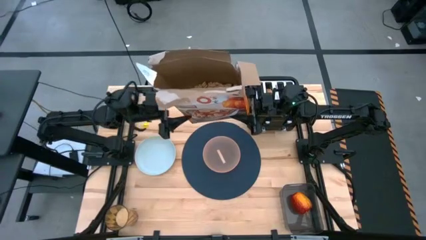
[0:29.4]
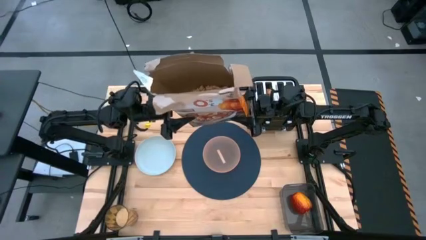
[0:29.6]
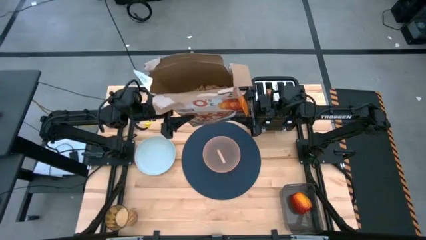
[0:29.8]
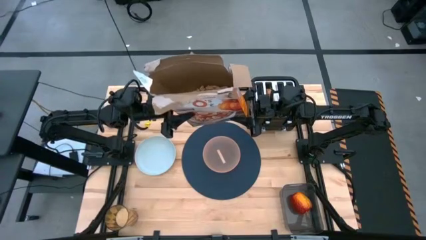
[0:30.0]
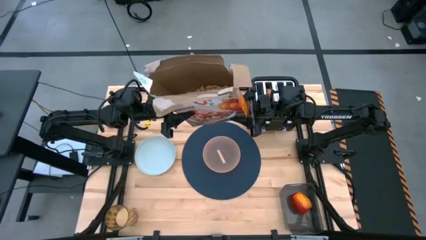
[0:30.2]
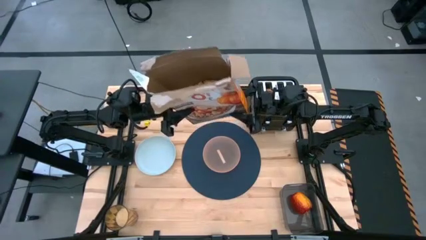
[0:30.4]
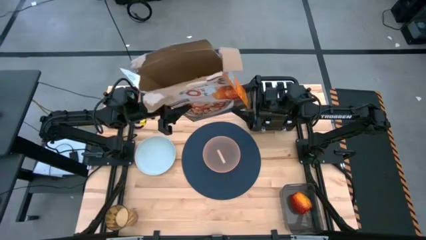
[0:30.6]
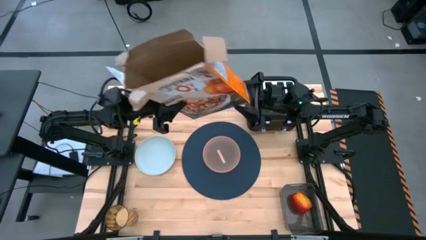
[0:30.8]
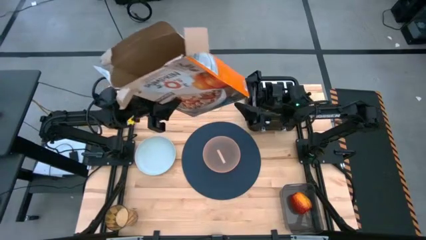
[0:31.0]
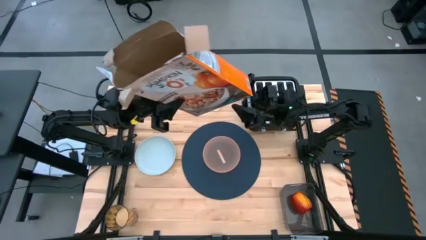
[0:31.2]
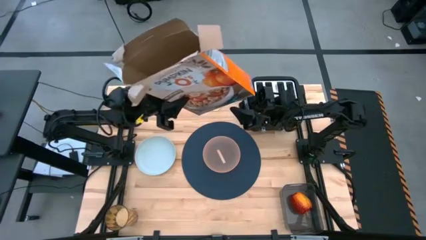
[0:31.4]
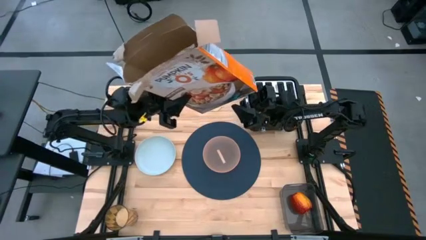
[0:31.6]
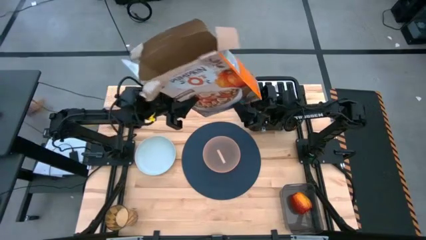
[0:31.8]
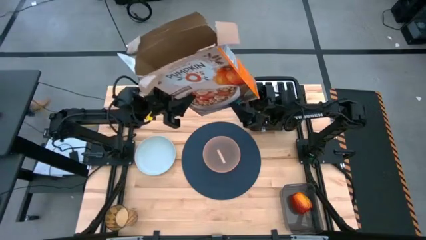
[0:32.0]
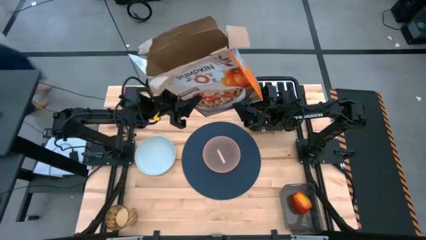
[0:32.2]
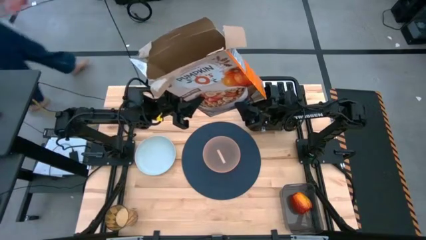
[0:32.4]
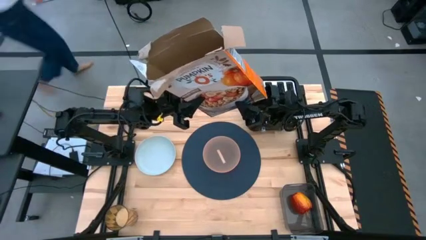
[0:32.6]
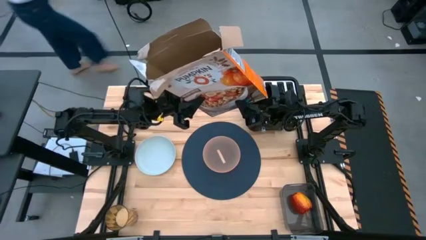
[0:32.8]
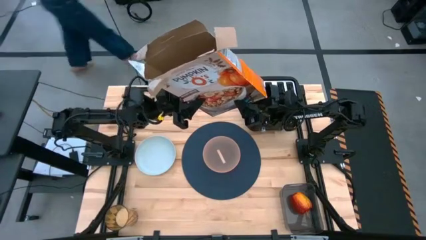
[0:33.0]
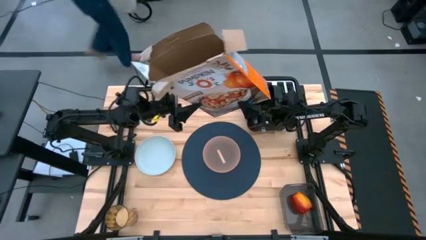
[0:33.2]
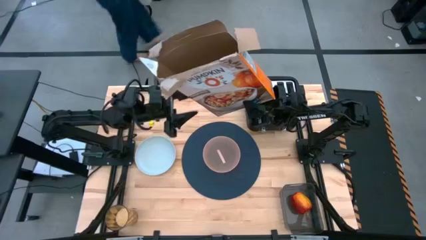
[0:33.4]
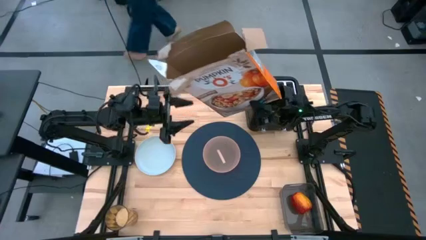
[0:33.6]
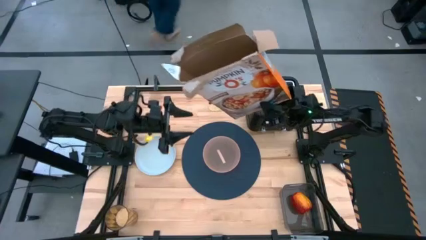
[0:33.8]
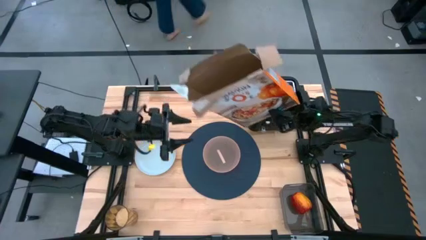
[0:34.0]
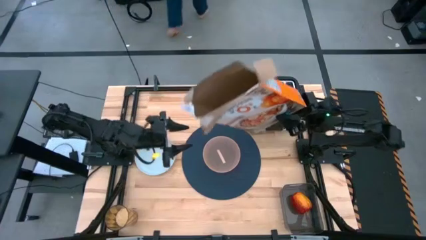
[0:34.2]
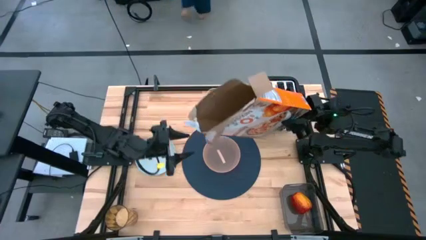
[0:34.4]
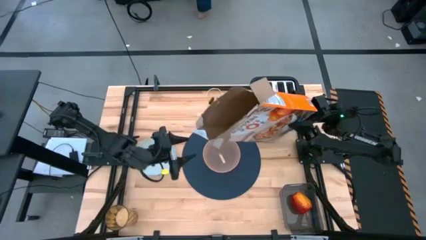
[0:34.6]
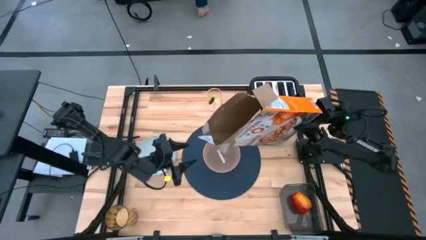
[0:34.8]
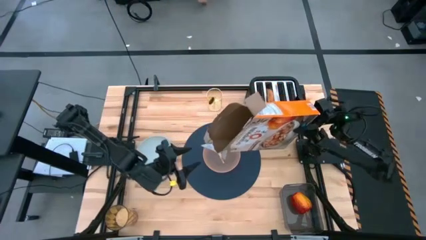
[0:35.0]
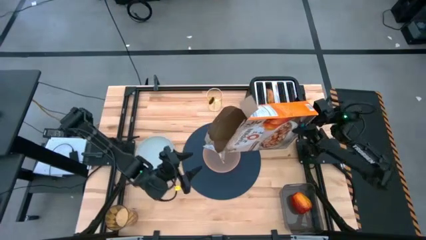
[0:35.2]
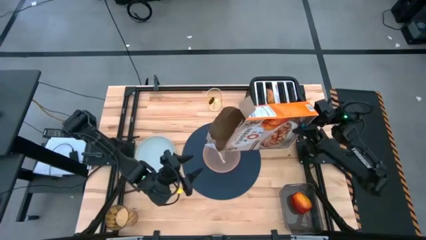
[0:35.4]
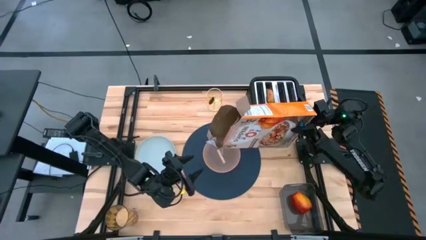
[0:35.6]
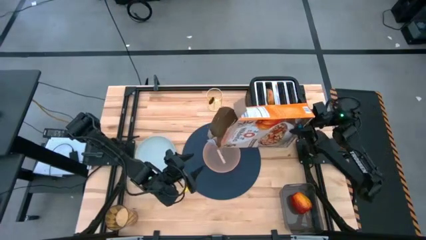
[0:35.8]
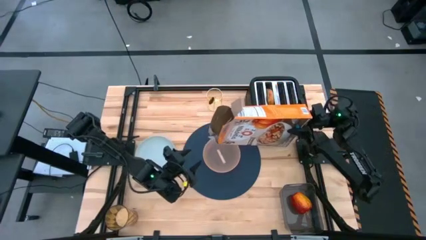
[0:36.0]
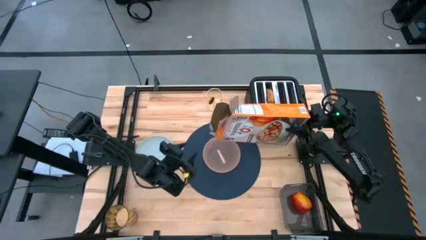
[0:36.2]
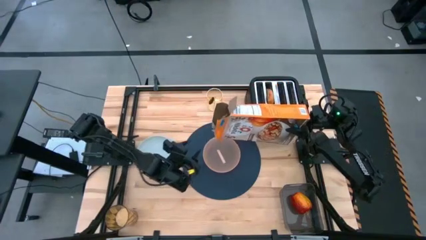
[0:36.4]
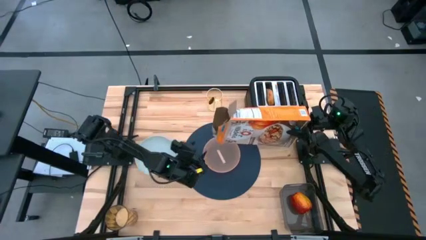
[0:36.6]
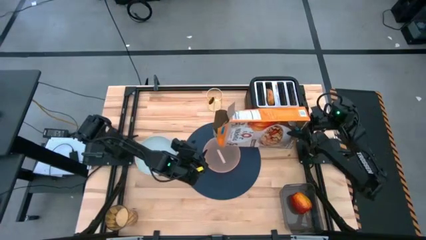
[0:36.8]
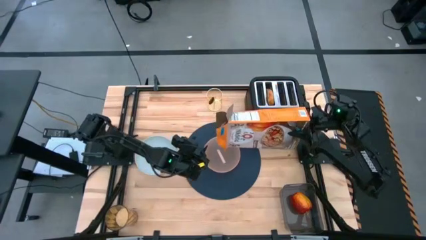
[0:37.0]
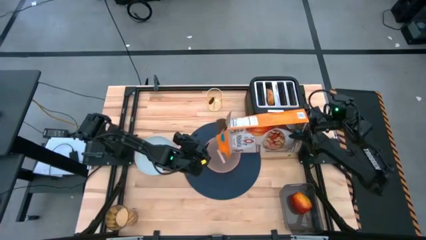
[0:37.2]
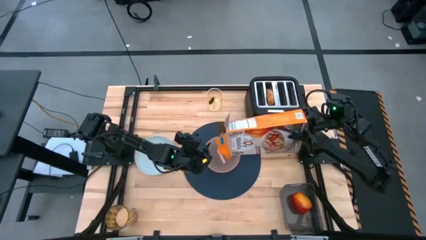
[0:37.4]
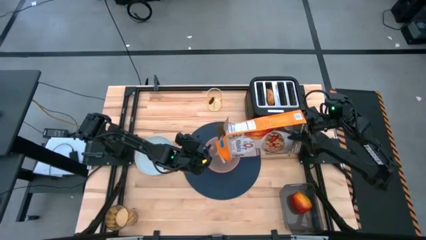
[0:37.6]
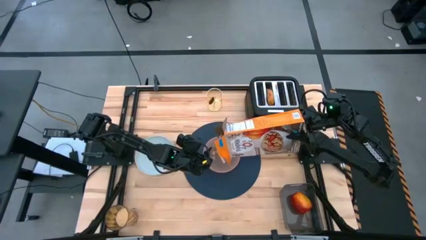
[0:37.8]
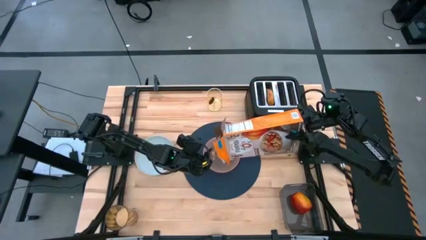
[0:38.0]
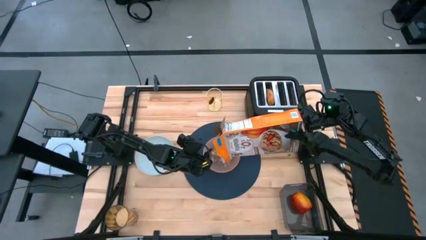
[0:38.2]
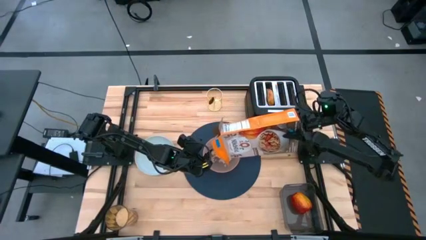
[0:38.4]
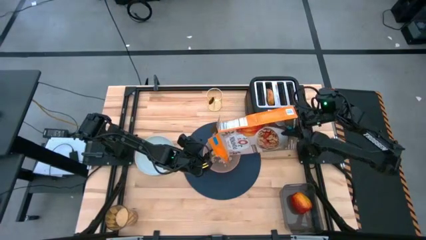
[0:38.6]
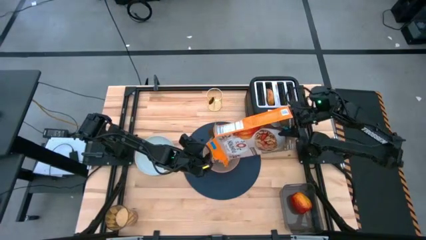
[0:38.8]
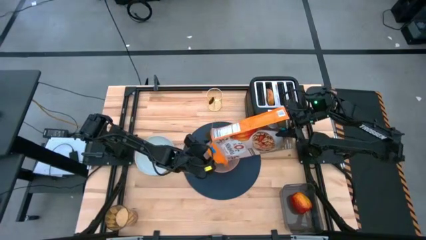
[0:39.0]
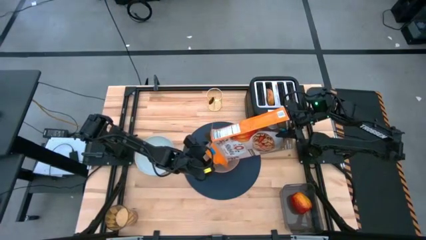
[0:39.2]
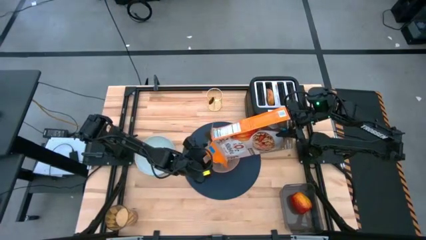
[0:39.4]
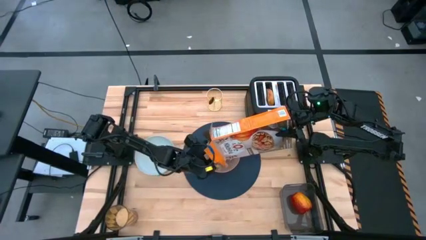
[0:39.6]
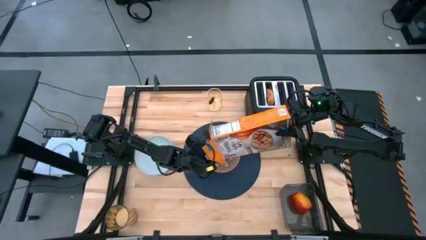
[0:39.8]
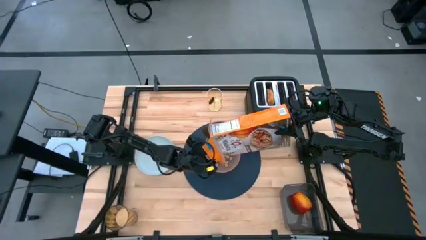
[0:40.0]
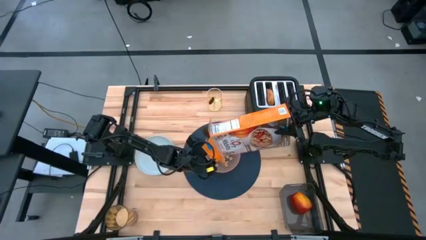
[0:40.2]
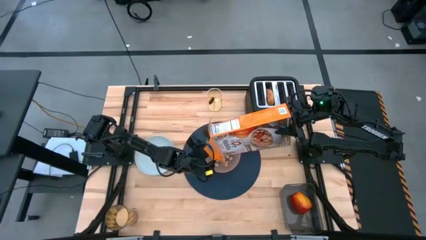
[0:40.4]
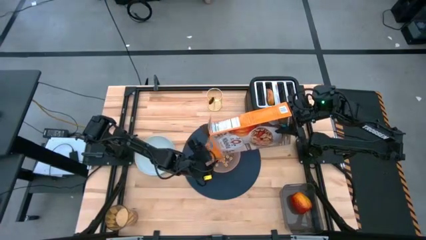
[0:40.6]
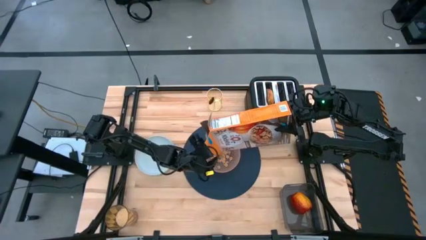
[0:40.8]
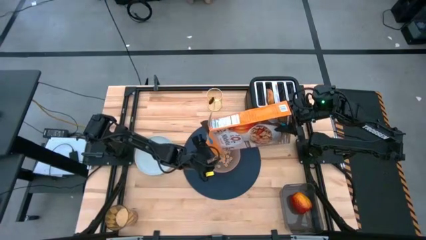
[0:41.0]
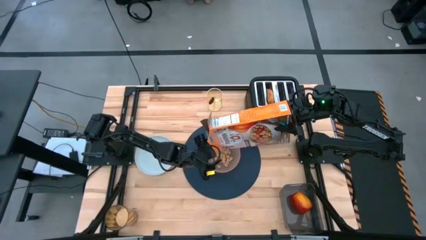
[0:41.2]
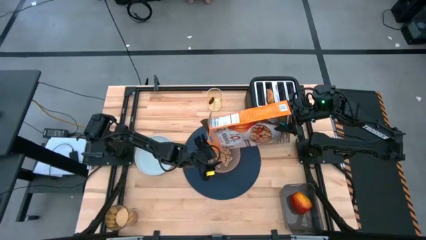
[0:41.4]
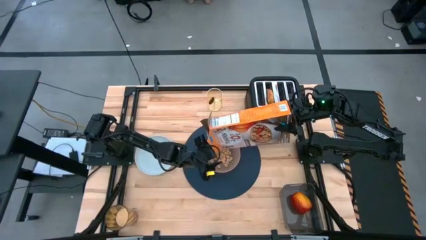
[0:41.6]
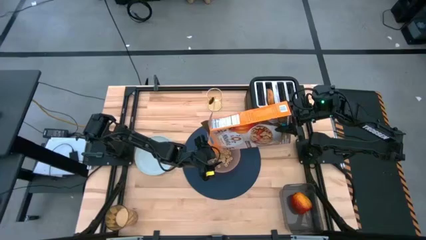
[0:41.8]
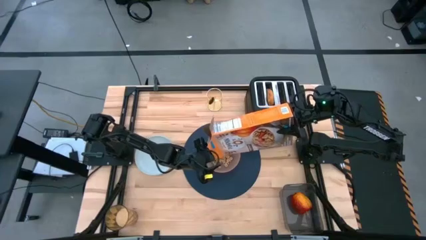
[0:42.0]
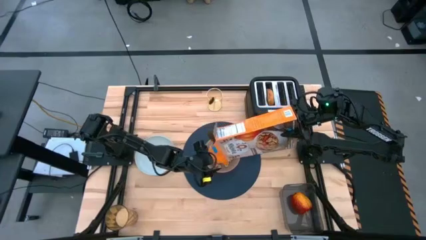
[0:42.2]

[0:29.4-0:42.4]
Task: Arrange a breakfast setting
Pour the cereal into the orange bowl
